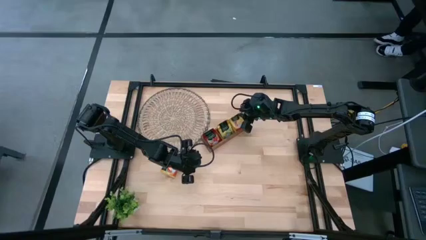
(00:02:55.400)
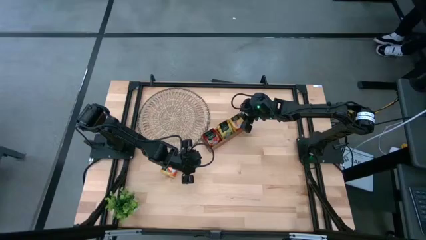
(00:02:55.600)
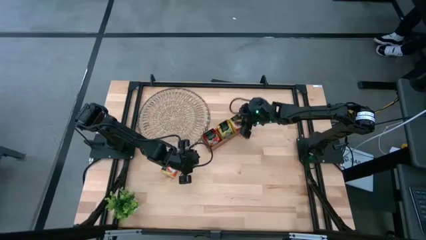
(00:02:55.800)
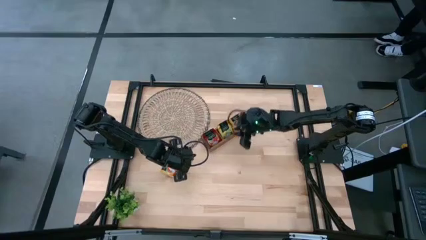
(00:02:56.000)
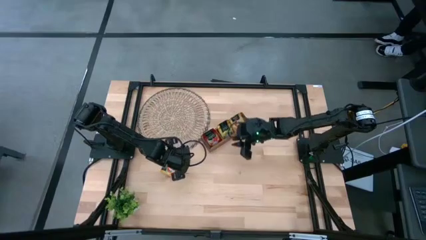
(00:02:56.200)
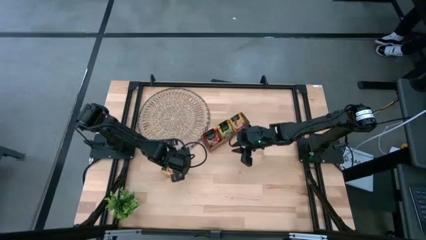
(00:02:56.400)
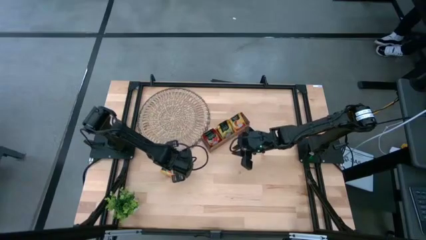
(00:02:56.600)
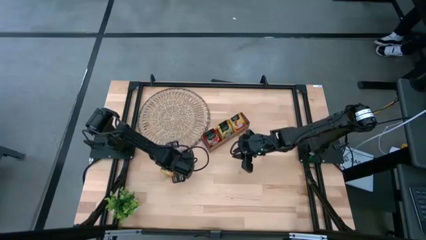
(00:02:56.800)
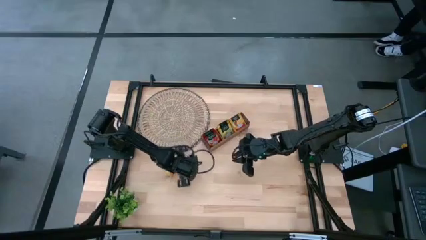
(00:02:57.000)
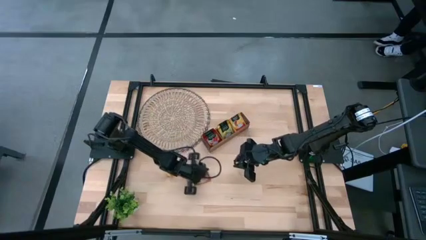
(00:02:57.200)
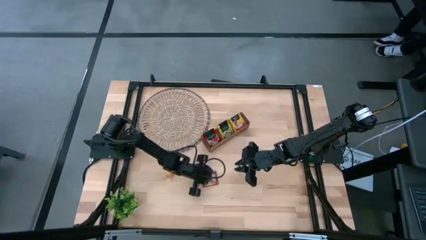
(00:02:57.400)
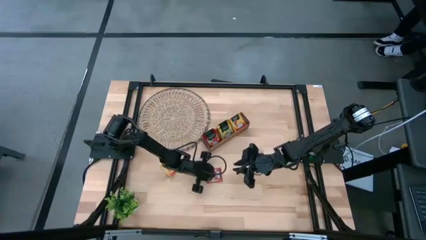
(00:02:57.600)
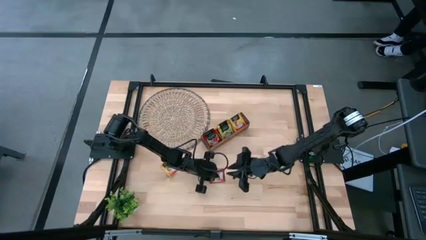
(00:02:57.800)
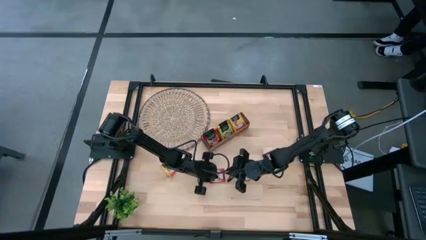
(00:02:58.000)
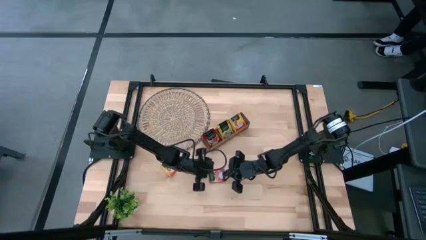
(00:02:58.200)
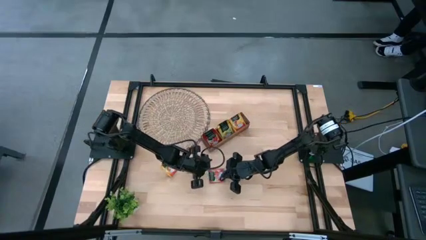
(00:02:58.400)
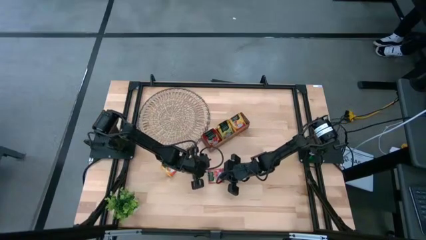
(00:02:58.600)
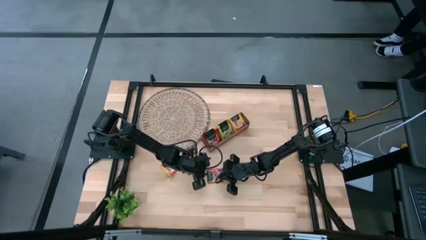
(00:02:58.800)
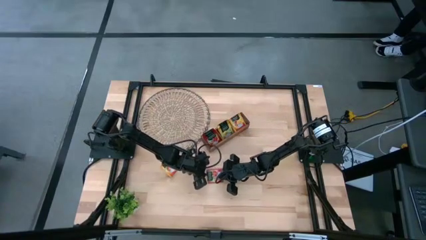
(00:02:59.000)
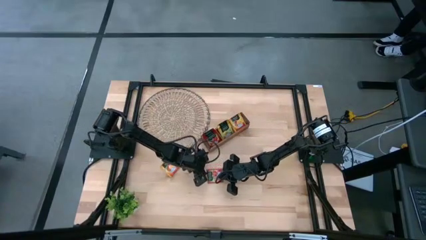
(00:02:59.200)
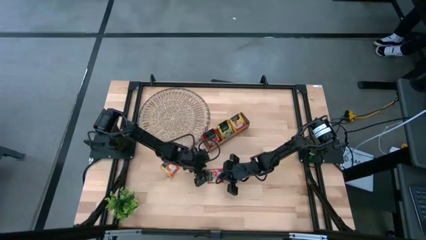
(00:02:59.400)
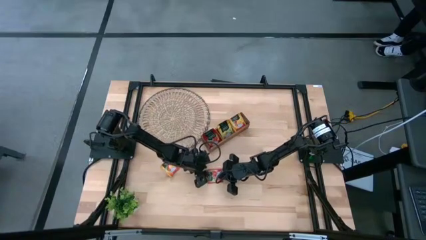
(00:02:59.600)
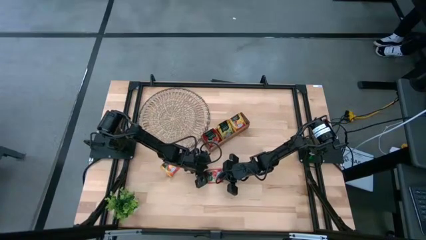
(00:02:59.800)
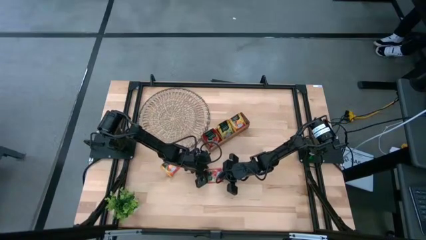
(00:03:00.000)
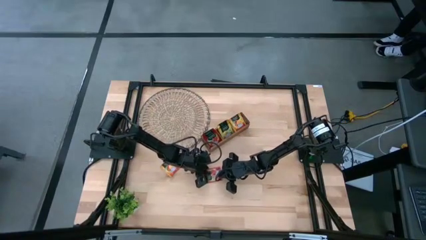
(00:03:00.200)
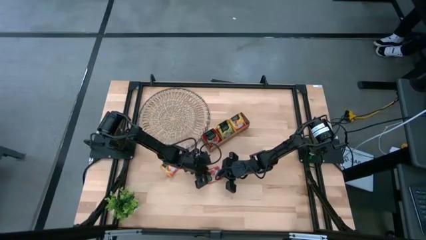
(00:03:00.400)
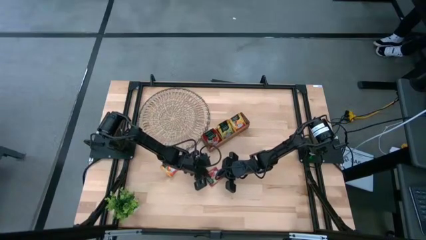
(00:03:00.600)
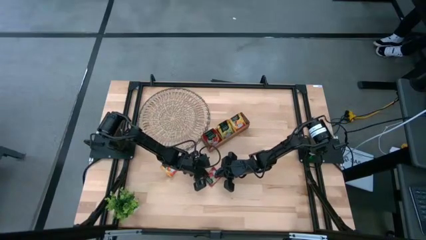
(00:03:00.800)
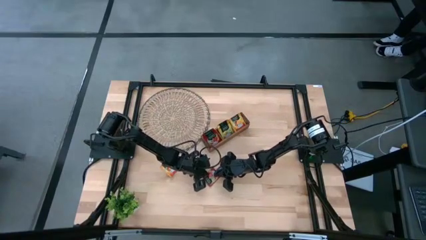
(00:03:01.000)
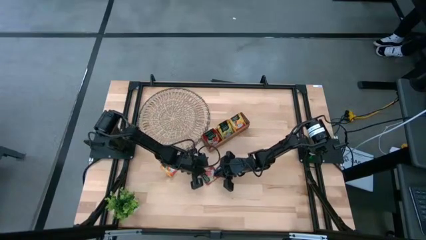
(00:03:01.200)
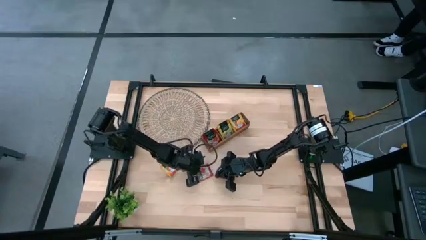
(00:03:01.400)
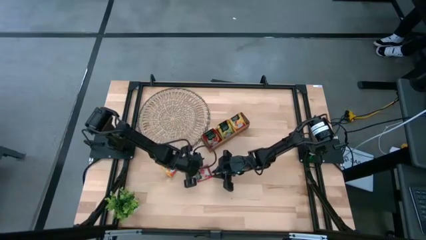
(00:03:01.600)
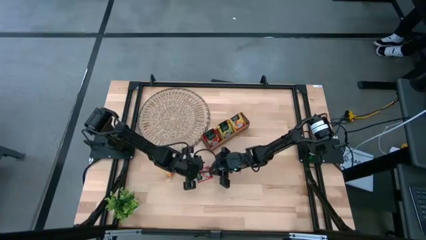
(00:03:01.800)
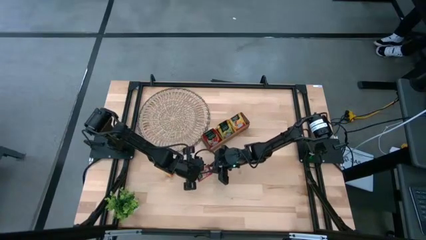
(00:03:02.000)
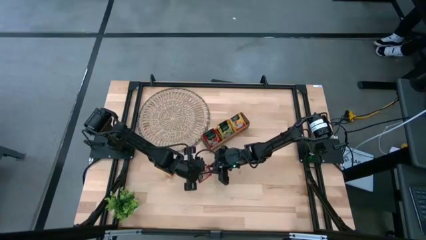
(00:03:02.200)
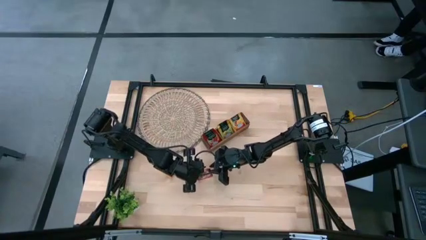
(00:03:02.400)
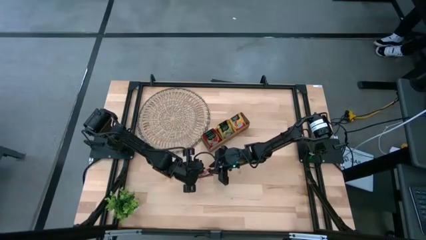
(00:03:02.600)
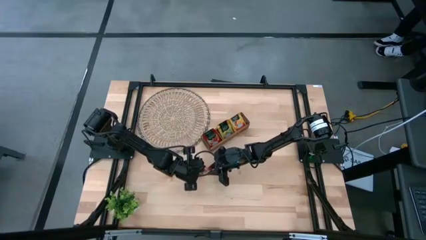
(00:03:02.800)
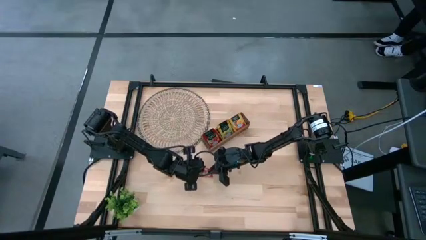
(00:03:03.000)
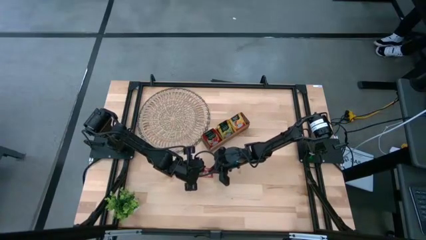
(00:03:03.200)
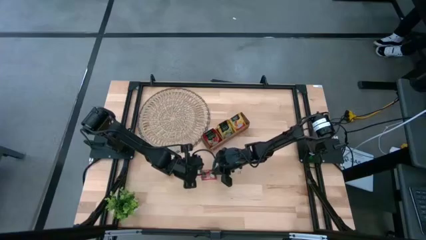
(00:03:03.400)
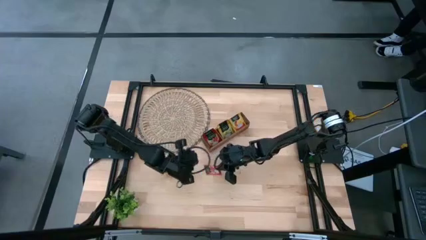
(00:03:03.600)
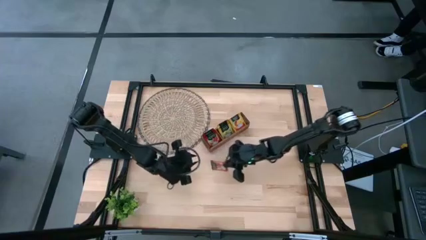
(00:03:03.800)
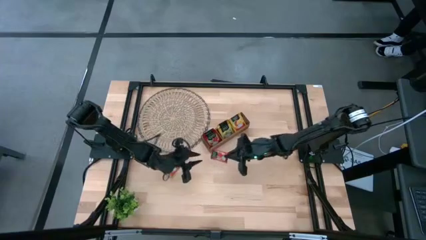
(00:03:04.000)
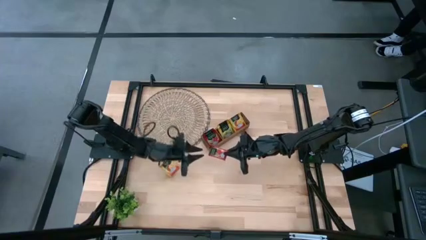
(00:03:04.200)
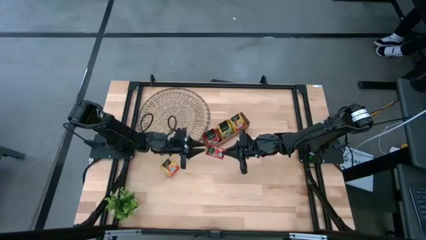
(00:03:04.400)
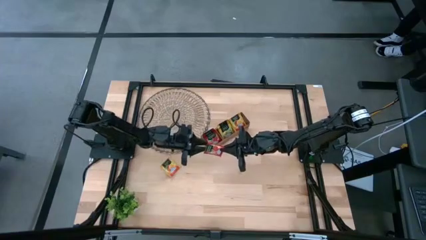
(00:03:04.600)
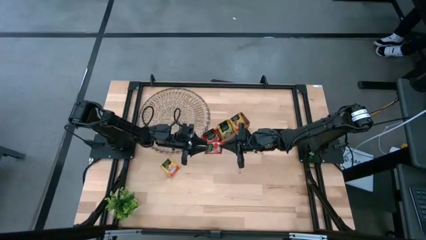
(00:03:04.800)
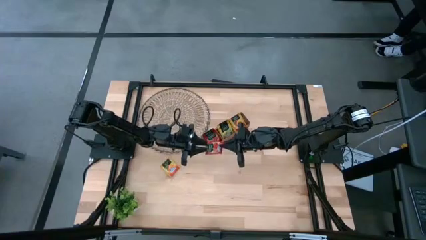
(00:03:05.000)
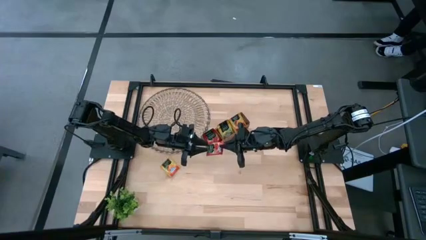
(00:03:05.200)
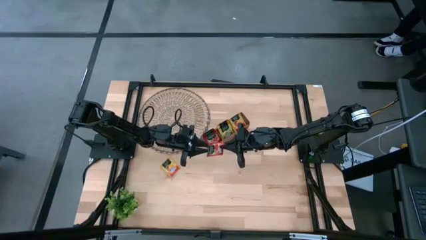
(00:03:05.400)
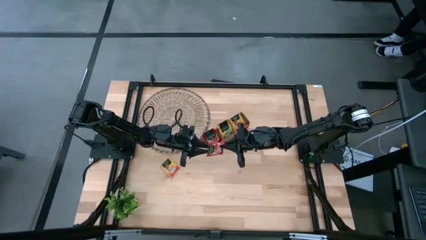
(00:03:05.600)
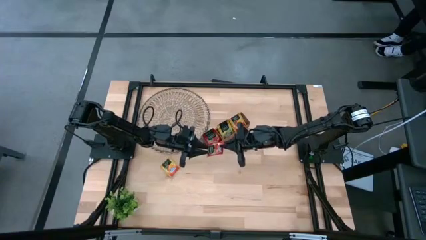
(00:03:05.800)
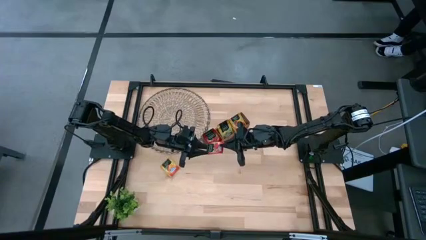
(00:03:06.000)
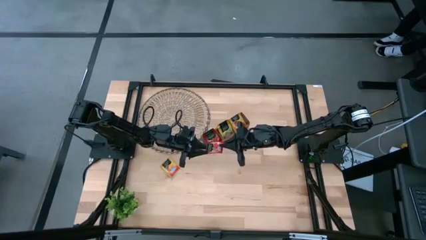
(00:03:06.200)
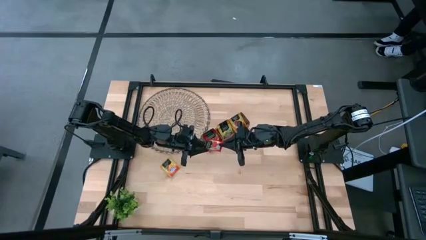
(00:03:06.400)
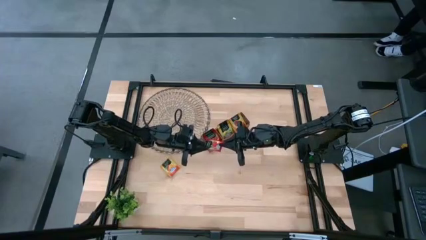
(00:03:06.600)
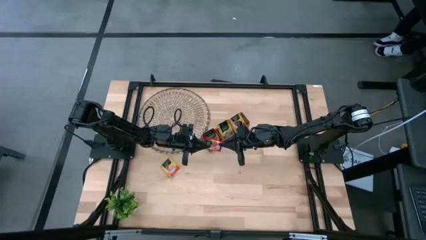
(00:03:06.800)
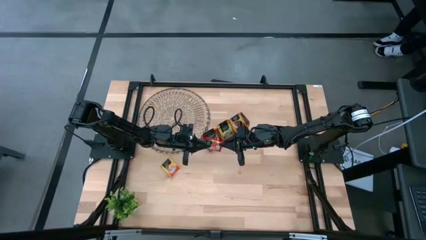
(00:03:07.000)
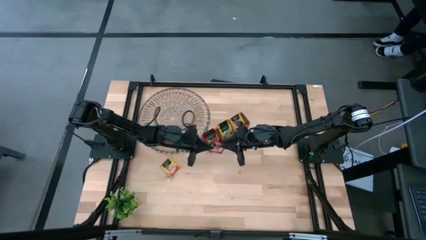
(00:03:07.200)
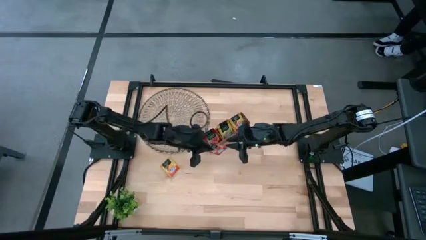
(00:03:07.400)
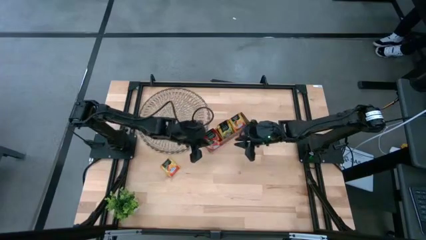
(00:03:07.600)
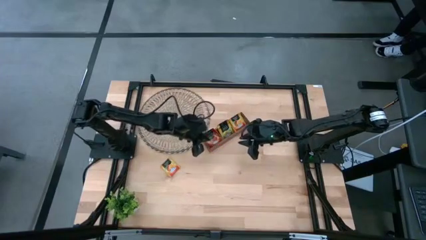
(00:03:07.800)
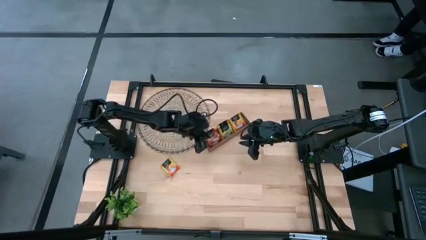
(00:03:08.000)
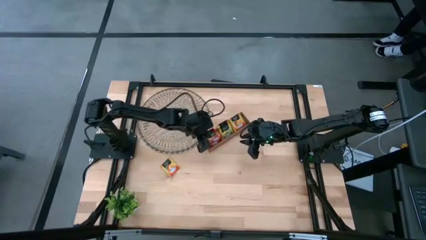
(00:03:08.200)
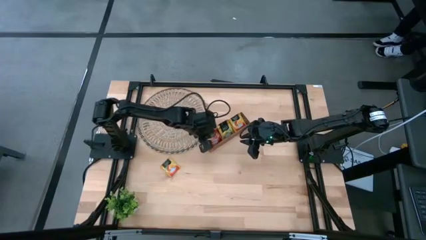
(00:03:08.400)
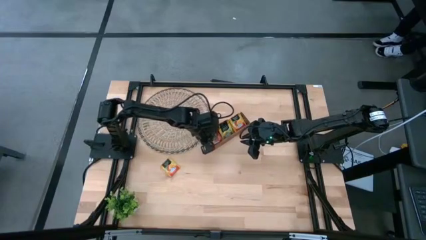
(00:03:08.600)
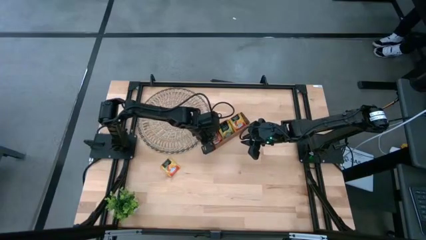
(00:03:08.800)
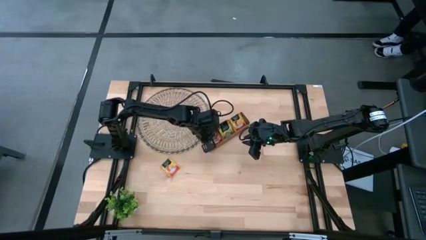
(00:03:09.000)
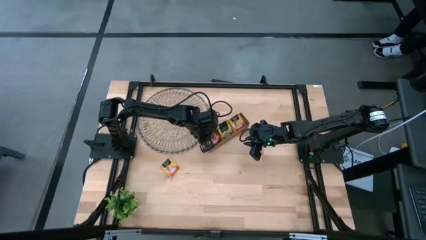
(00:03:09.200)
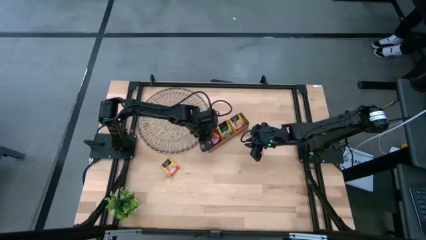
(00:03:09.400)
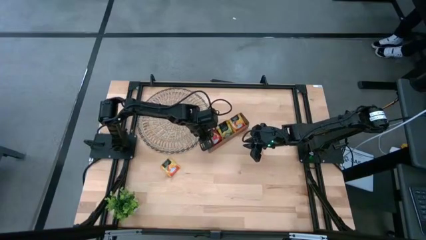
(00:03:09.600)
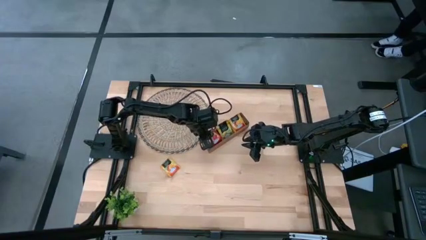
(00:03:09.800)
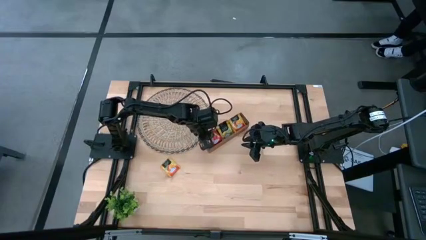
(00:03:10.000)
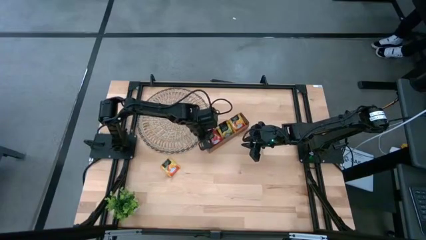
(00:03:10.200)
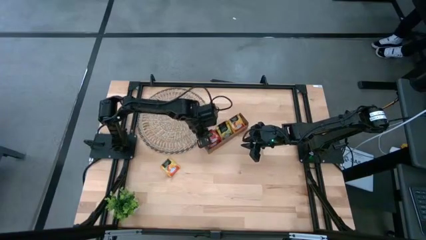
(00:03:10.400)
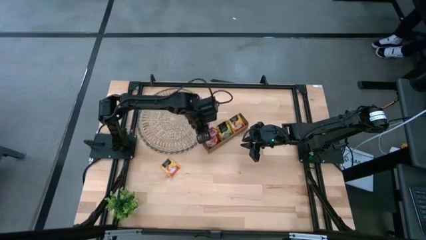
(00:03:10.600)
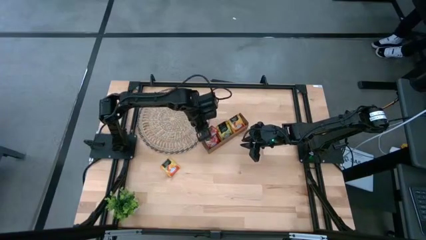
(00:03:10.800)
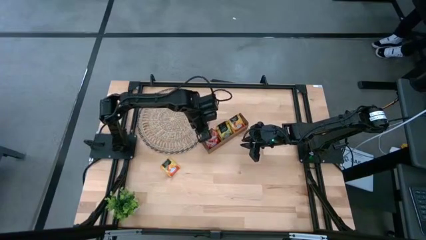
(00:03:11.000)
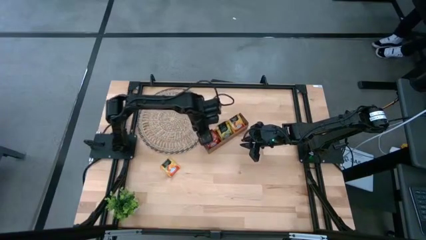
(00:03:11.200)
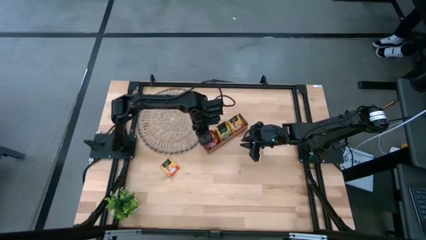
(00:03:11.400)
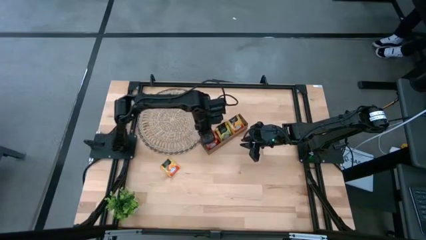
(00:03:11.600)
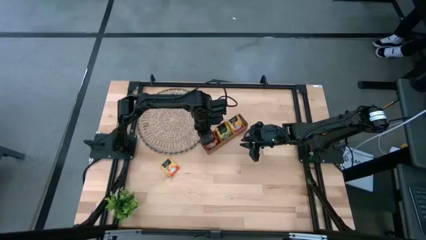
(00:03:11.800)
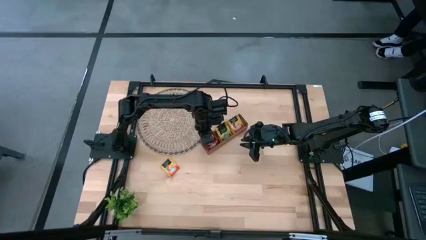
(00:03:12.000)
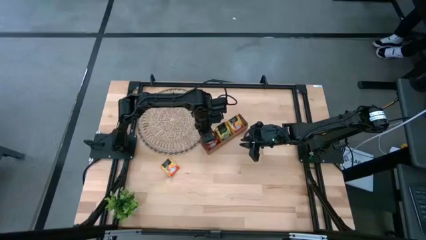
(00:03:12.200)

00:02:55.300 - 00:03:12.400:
Task: Pick & Place Tea
Put the red tea bag into the left section of the wooden organizer
